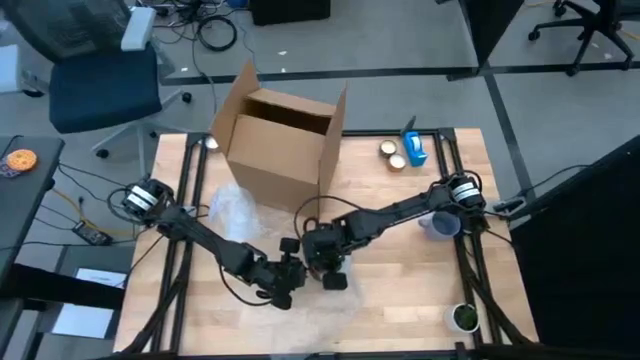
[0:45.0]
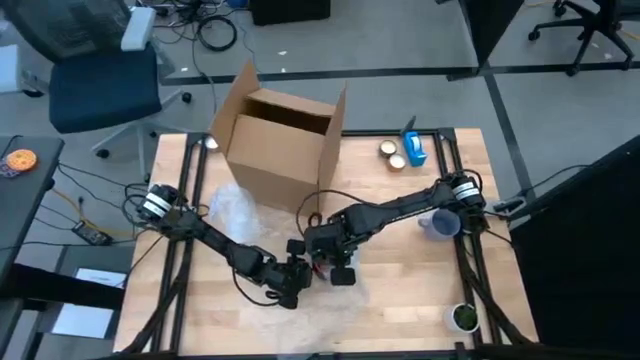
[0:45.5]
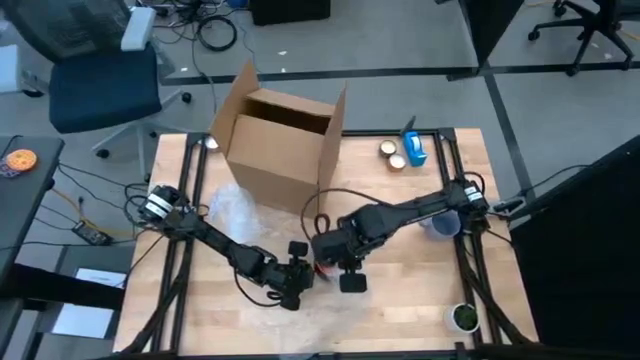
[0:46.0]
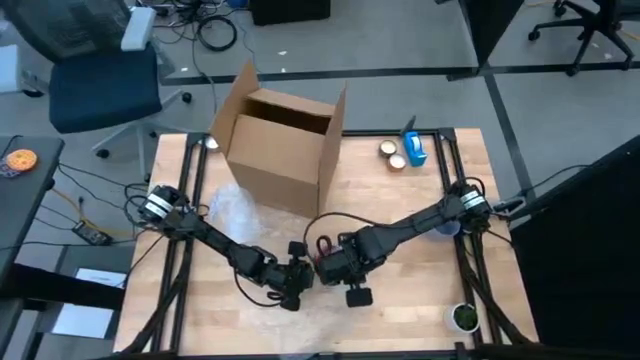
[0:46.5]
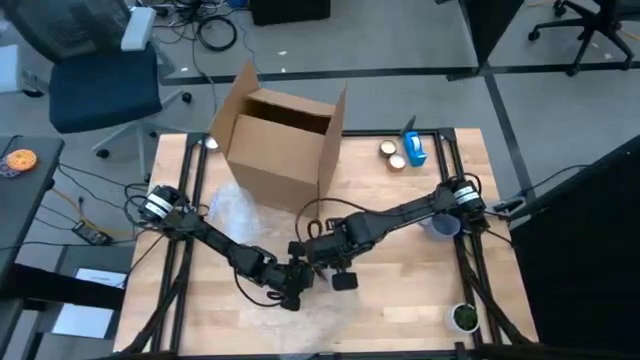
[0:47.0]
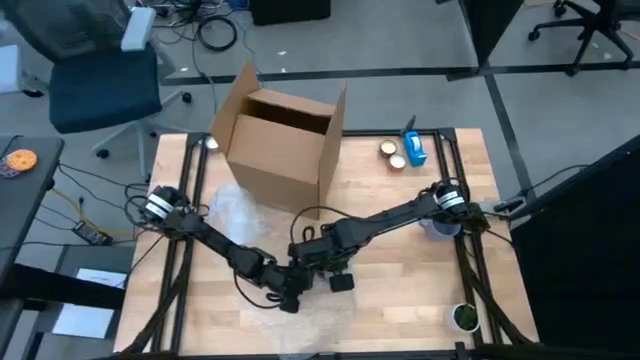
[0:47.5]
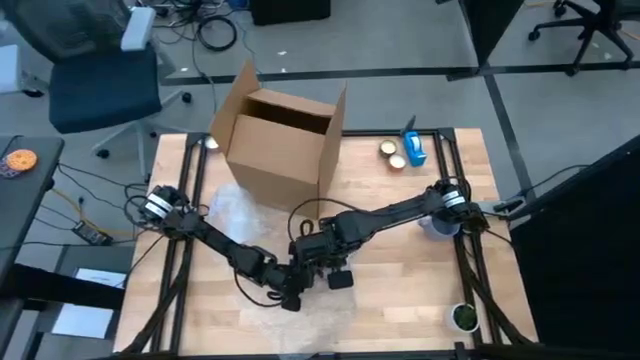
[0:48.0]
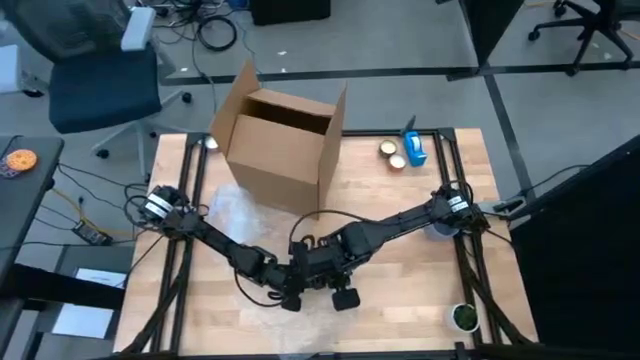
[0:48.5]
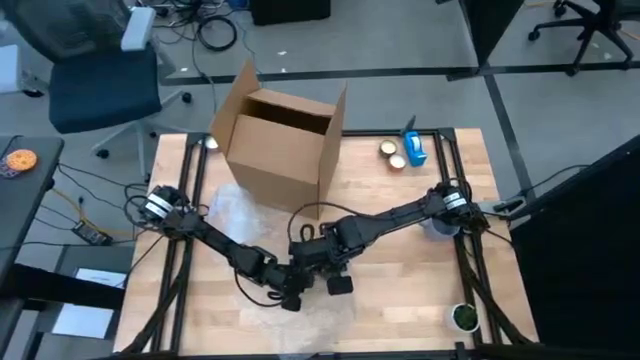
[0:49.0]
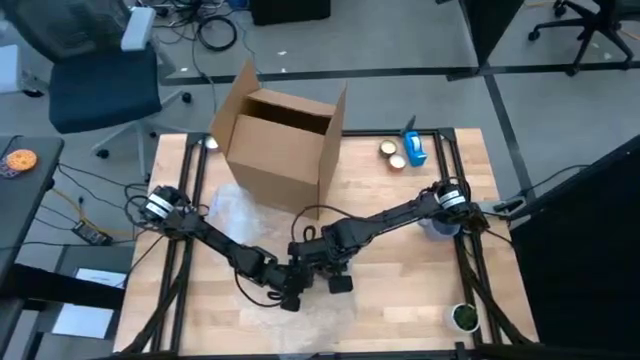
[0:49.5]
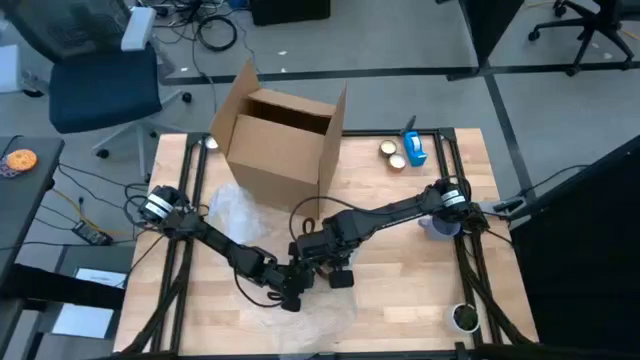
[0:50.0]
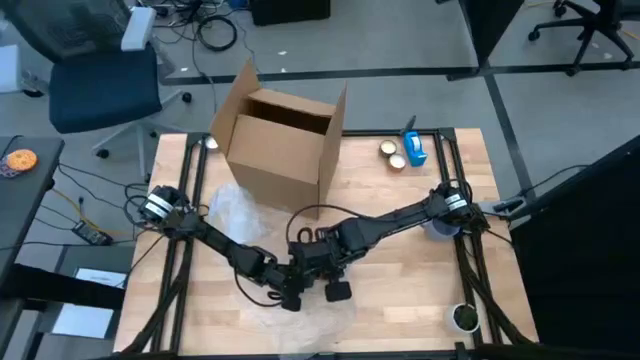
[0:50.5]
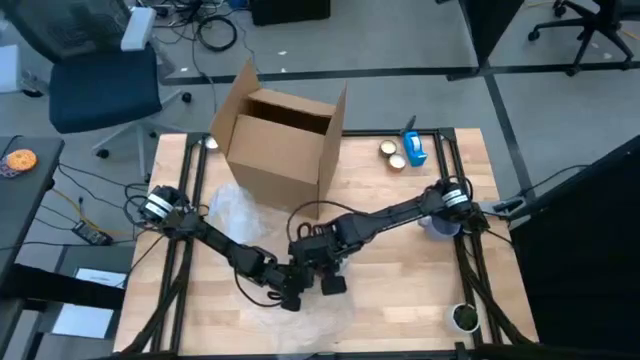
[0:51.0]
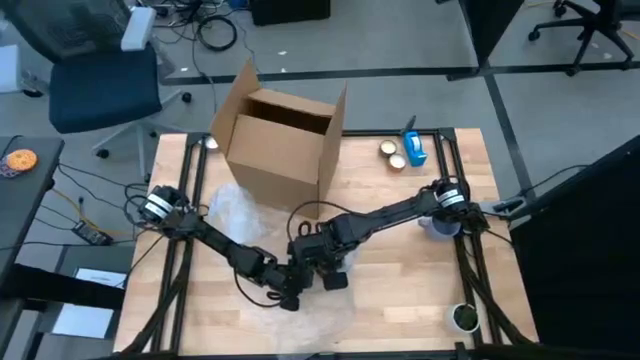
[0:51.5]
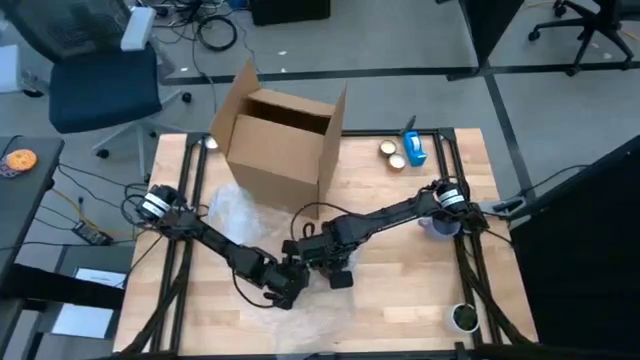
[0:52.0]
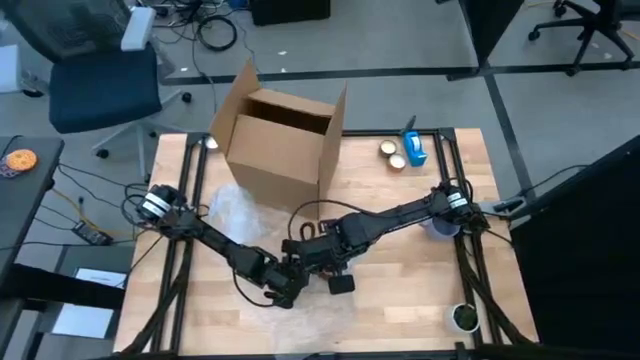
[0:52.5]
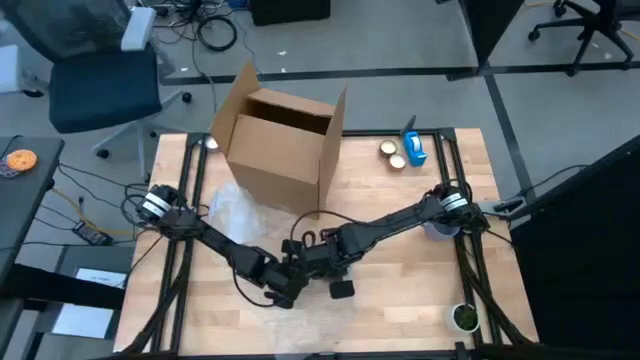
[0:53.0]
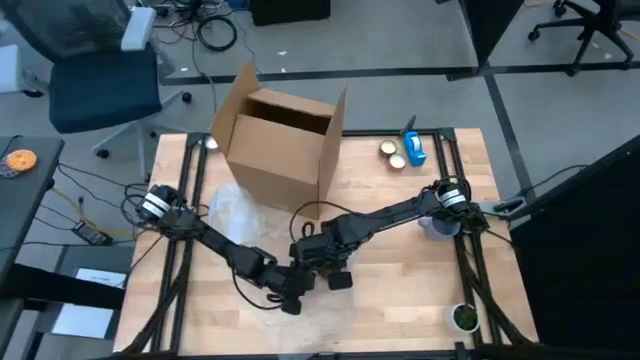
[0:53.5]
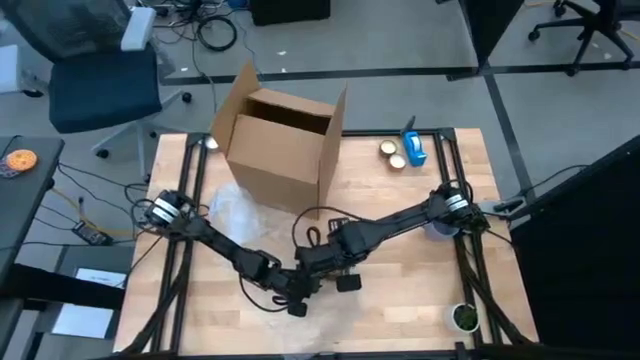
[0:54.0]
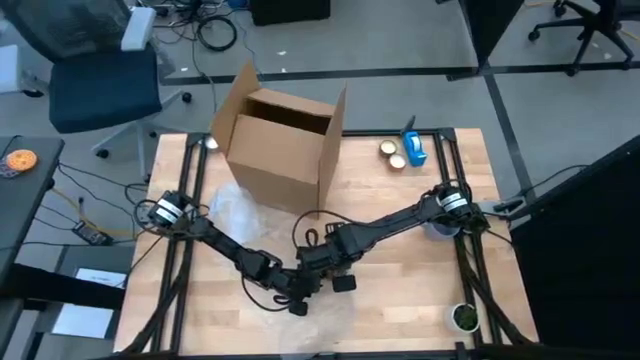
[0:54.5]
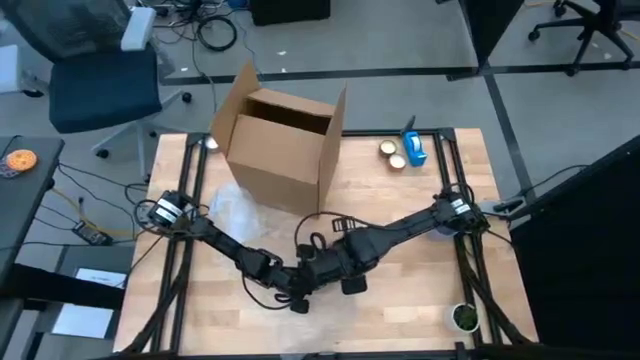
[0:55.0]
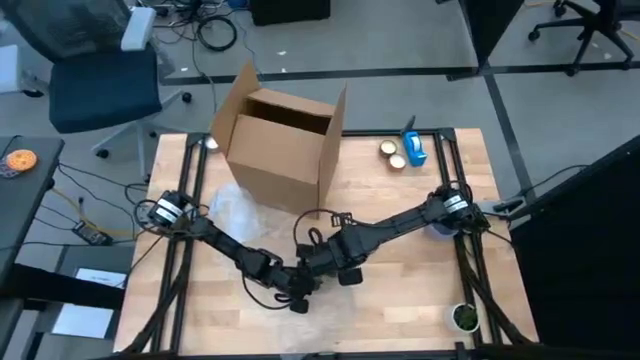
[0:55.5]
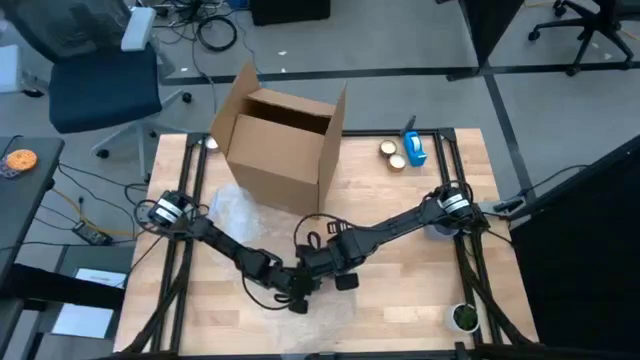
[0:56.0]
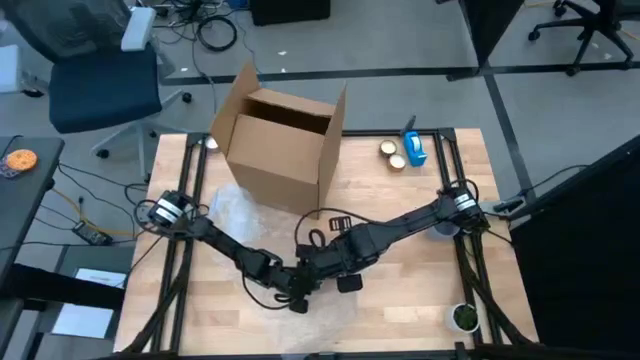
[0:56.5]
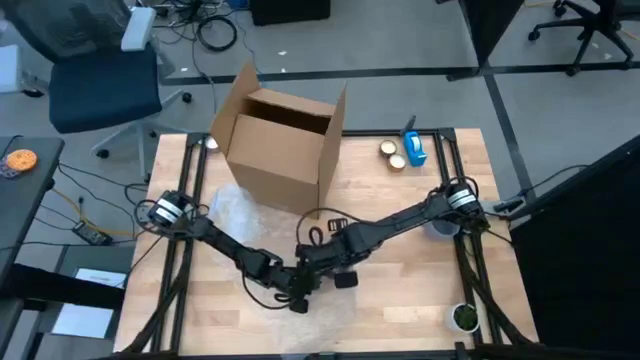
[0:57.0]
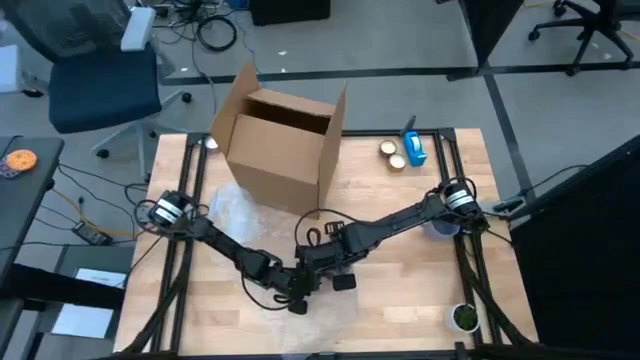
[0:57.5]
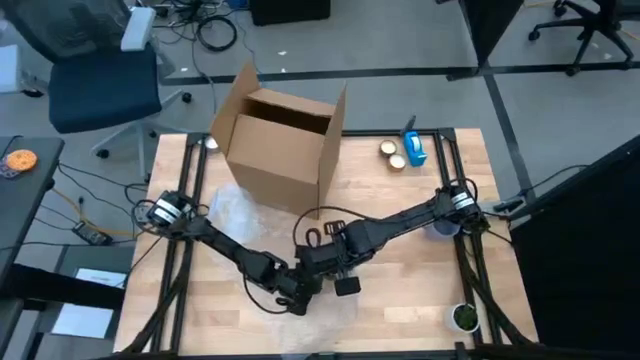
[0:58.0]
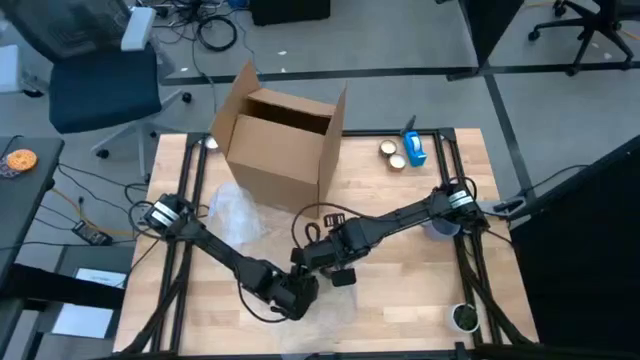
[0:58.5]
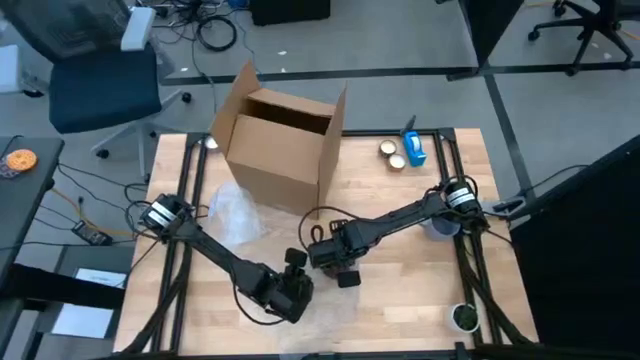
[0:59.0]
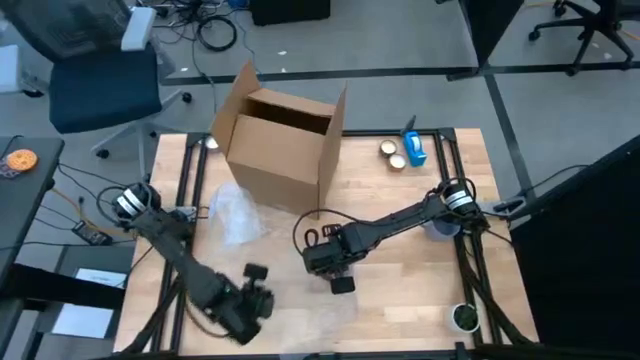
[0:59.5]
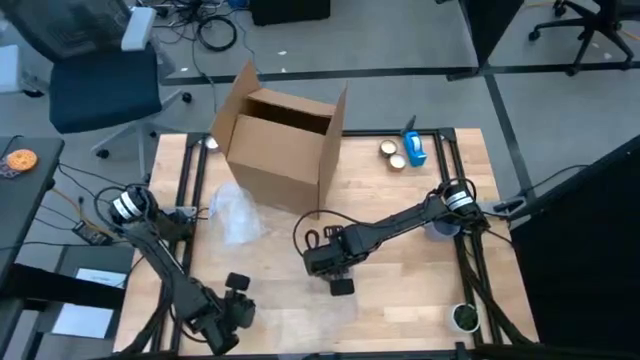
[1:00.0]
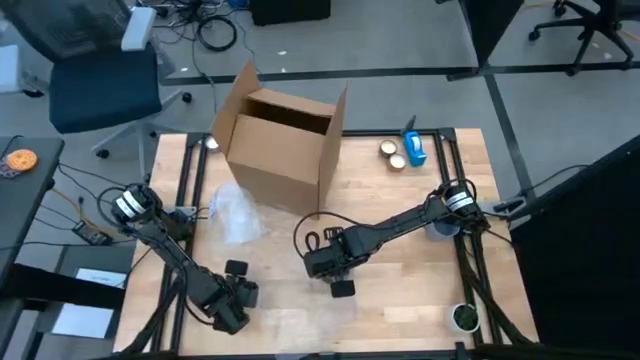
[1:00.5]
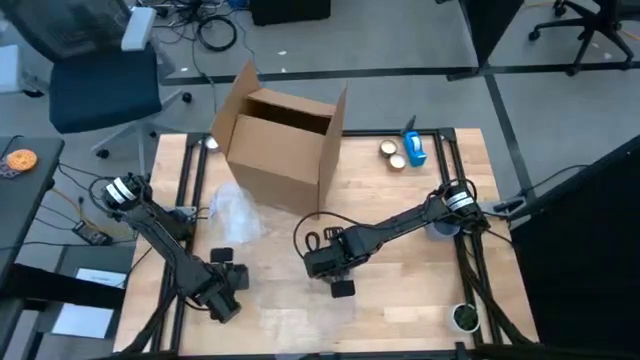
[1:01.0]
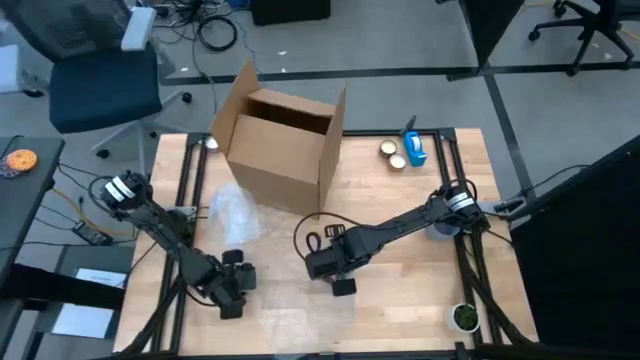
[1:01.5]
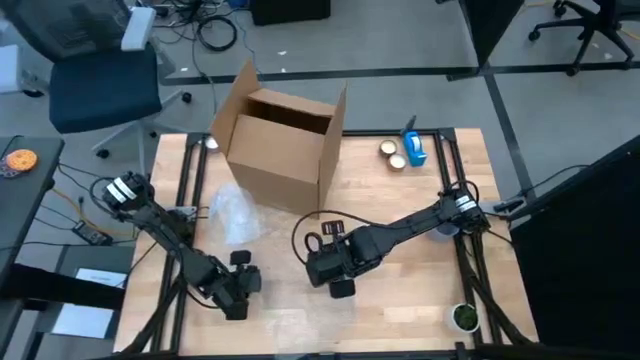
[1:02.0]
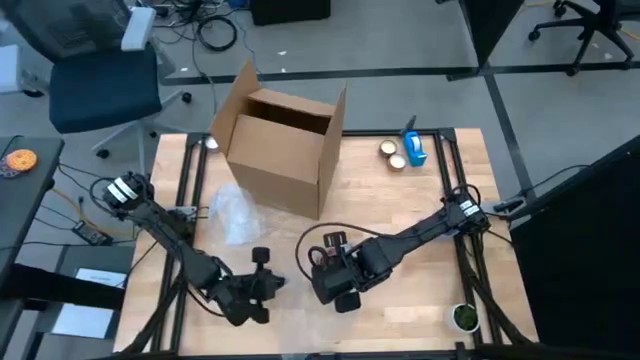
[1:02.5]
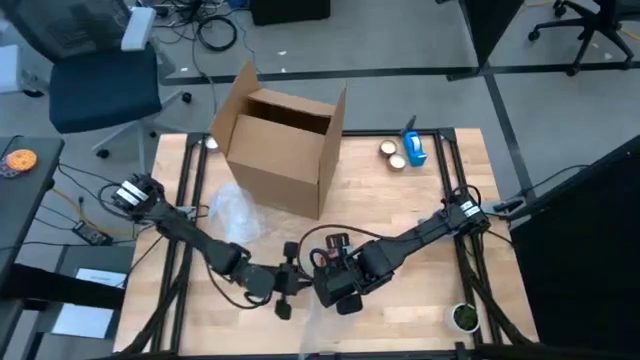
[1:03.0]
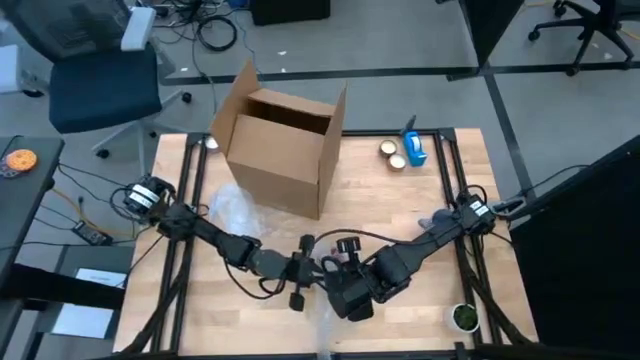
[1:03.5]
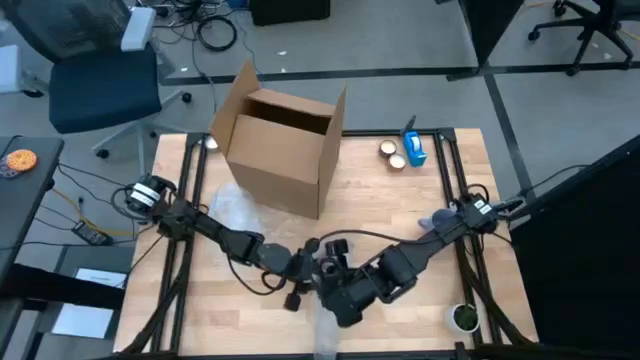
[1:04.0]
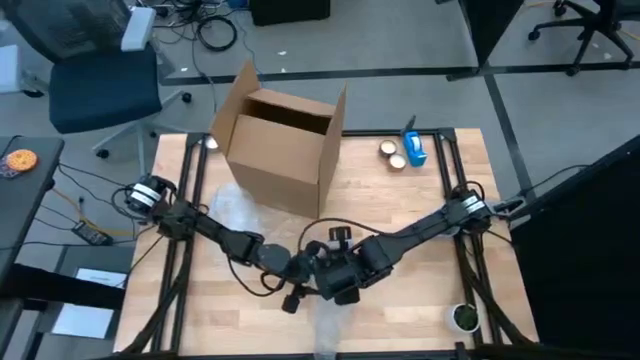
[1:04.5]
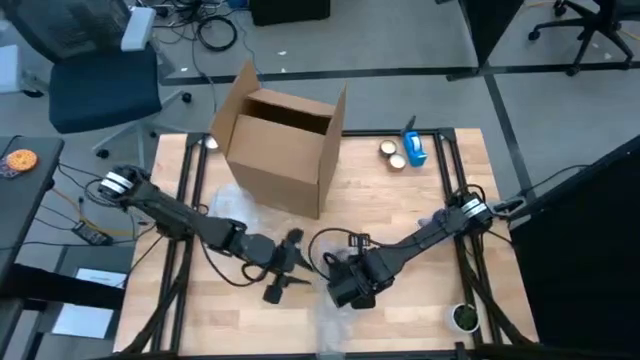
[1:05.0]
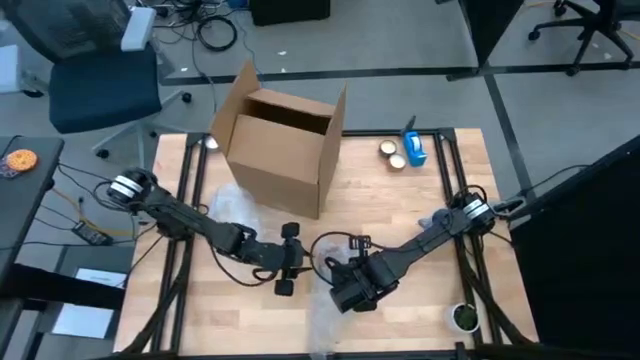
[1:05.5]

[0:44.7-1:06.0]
Task: wrap mug
Wrap the orange mug with bubble wrap

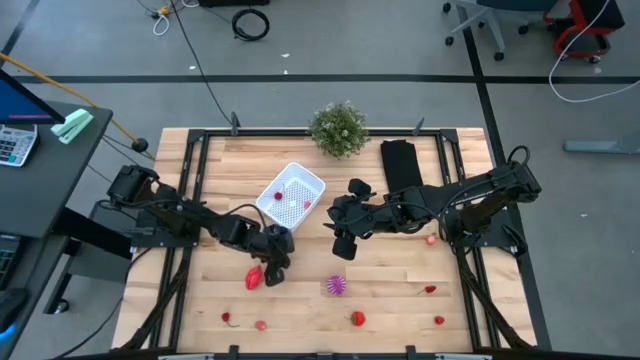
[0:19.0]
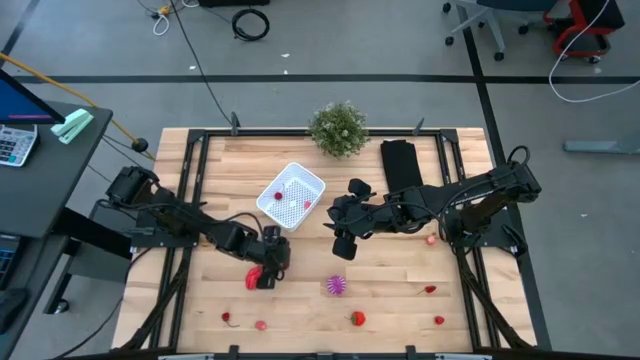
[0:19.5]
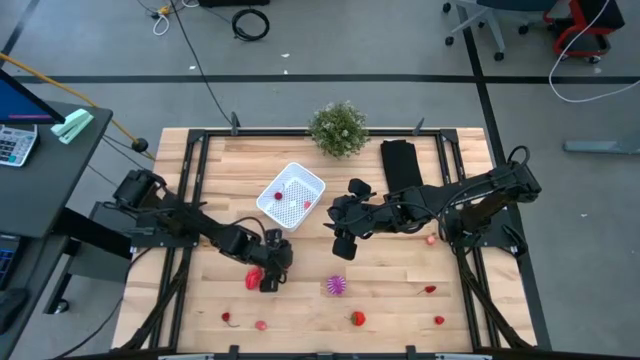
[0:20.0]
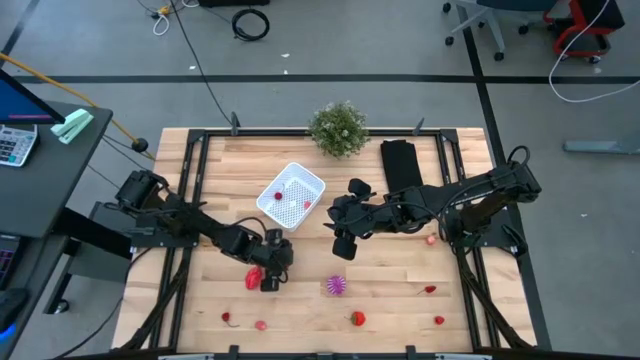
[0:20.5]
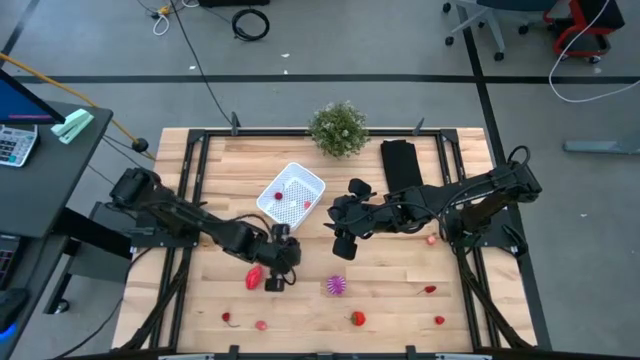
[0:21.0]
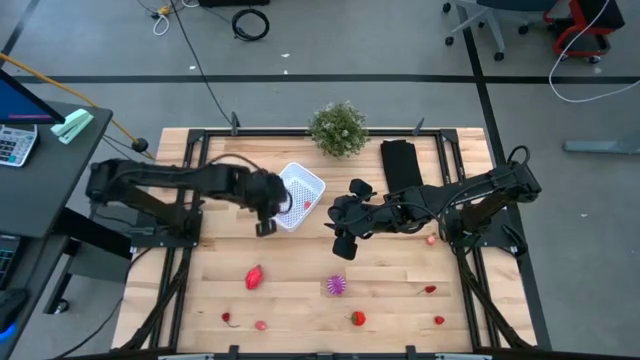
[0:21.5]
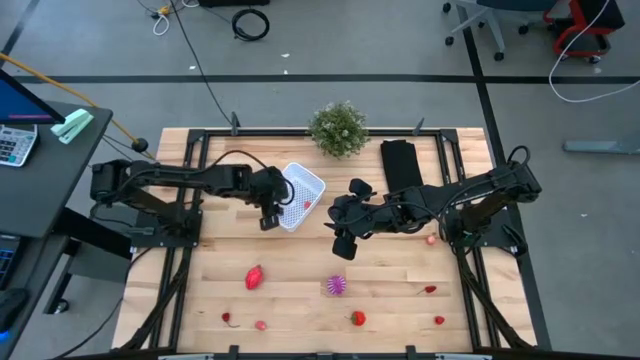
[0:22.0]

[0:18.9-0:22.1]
Task: Pick and placing Produce into tupperware
Put the red cherry into the white basket
